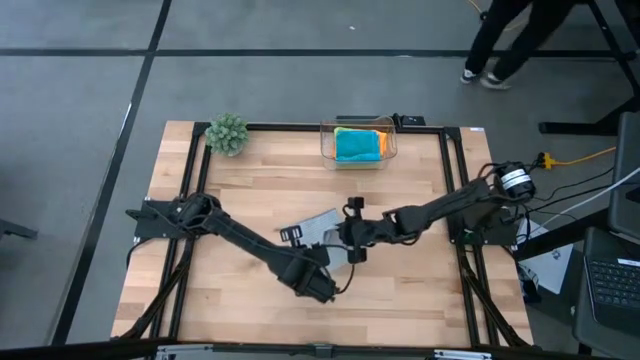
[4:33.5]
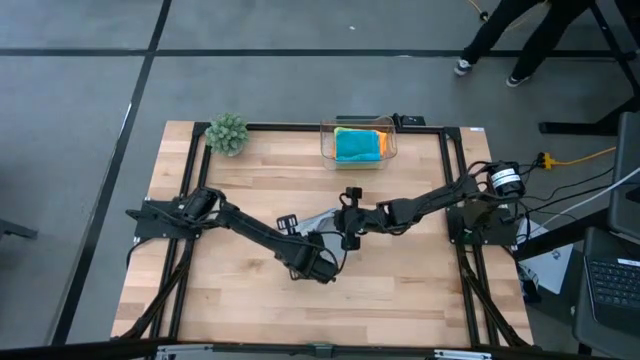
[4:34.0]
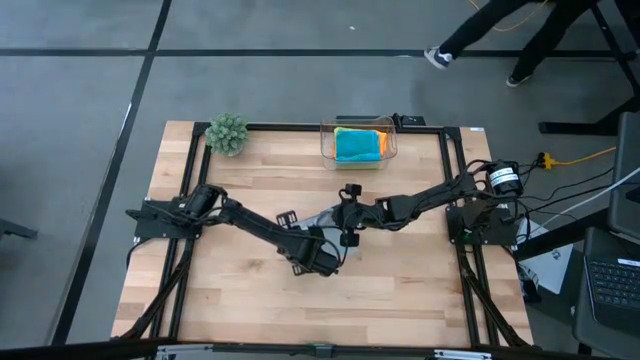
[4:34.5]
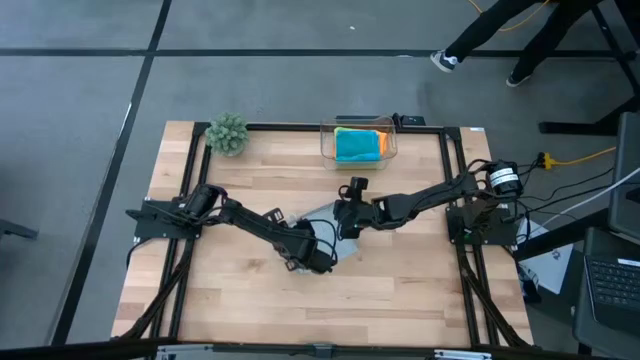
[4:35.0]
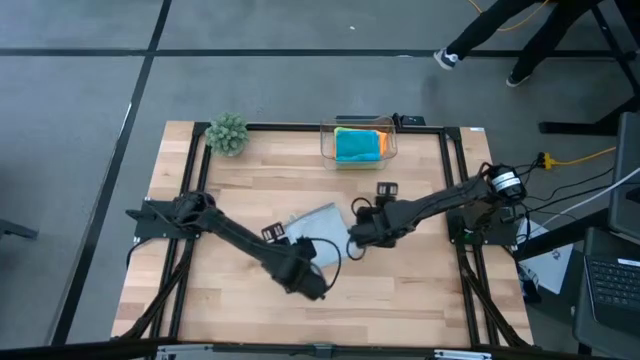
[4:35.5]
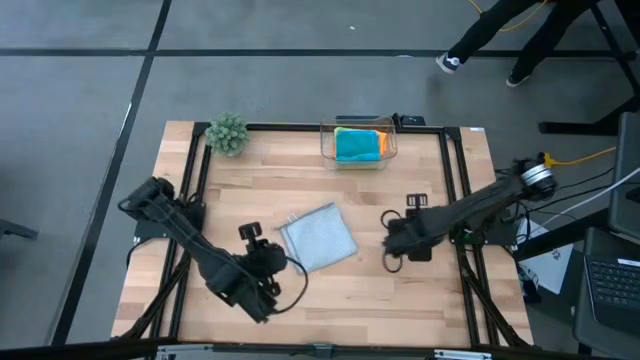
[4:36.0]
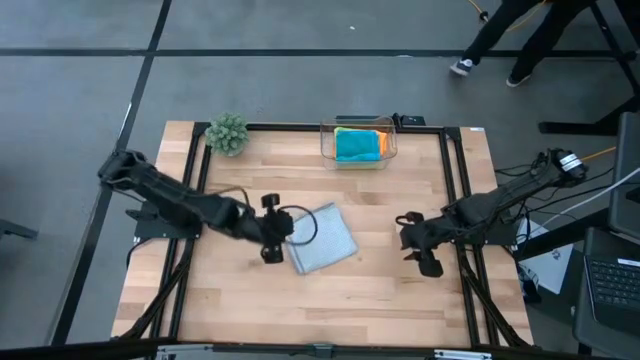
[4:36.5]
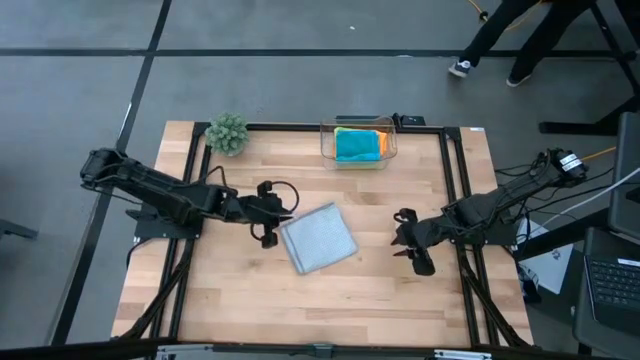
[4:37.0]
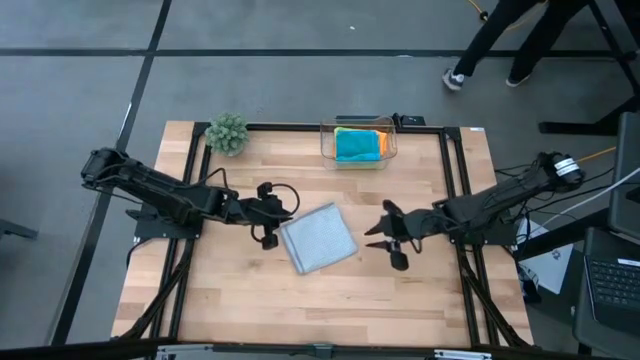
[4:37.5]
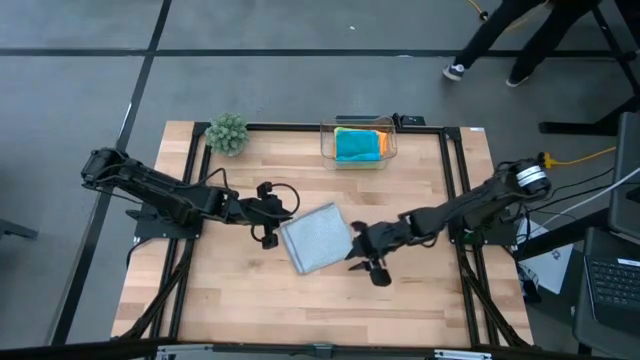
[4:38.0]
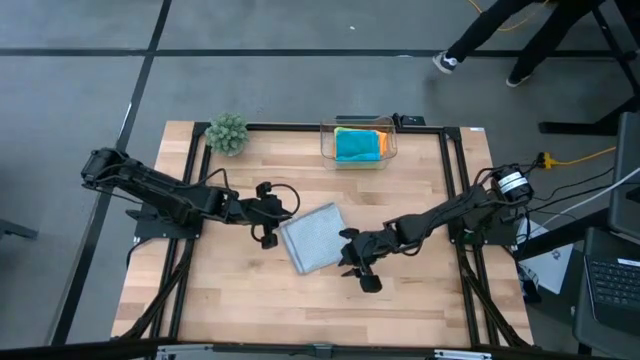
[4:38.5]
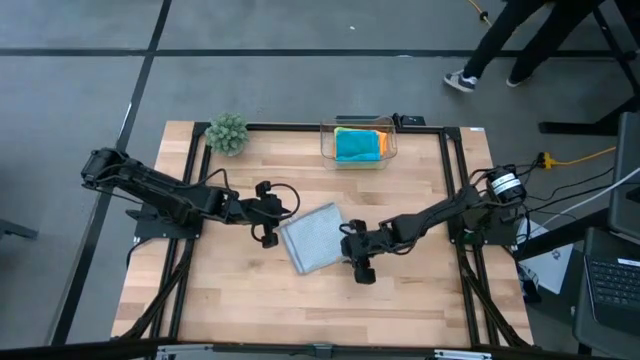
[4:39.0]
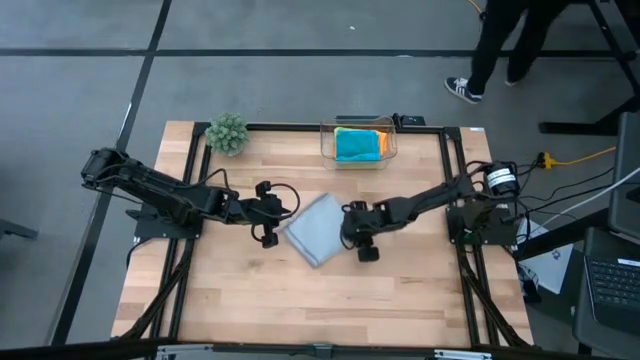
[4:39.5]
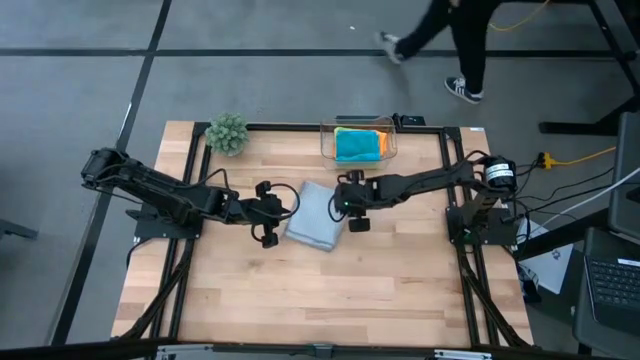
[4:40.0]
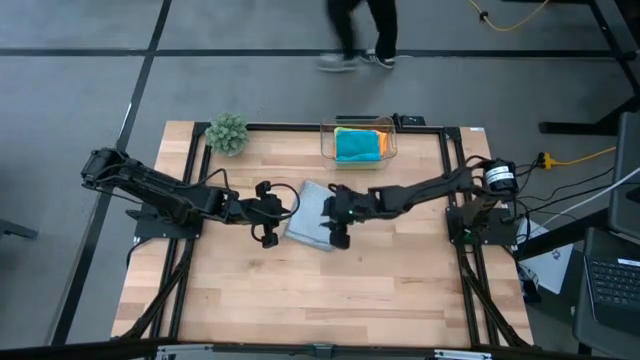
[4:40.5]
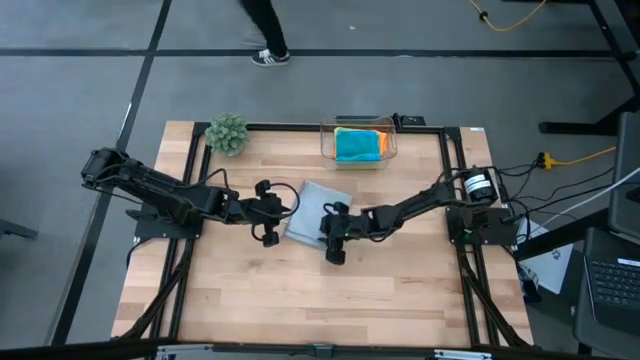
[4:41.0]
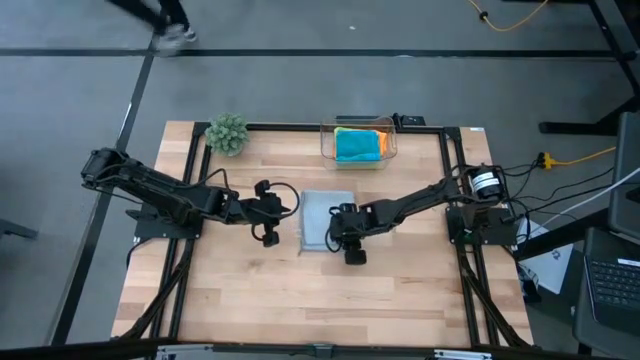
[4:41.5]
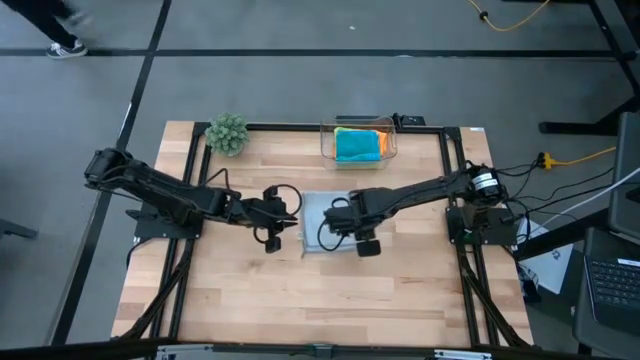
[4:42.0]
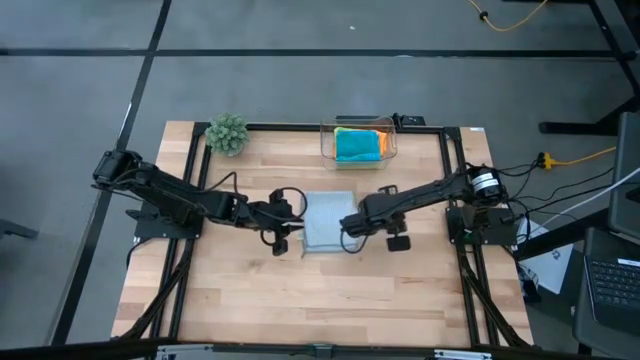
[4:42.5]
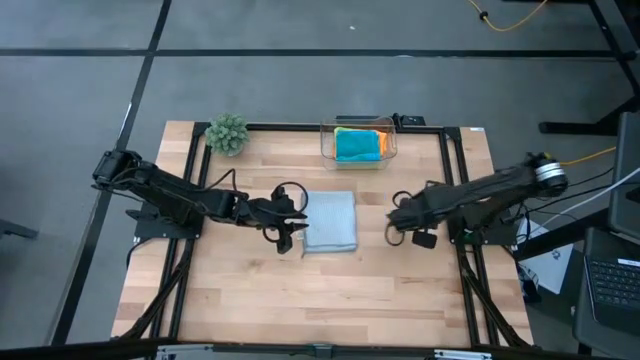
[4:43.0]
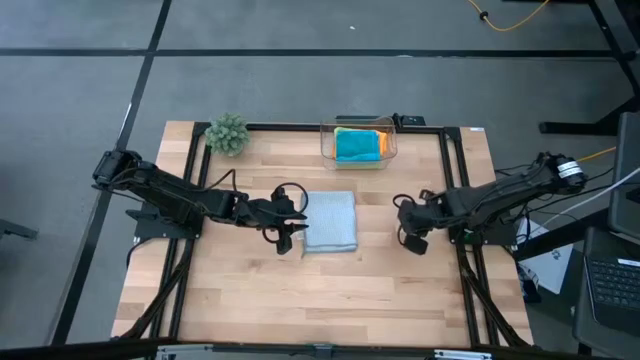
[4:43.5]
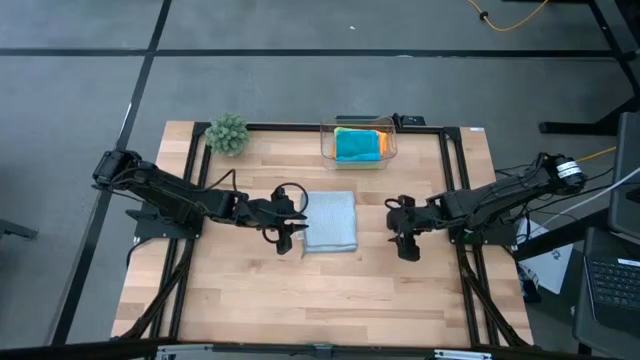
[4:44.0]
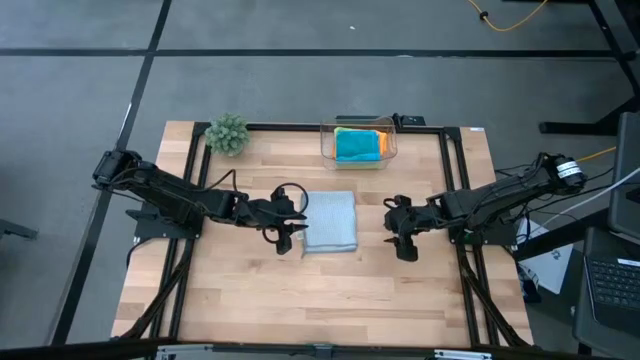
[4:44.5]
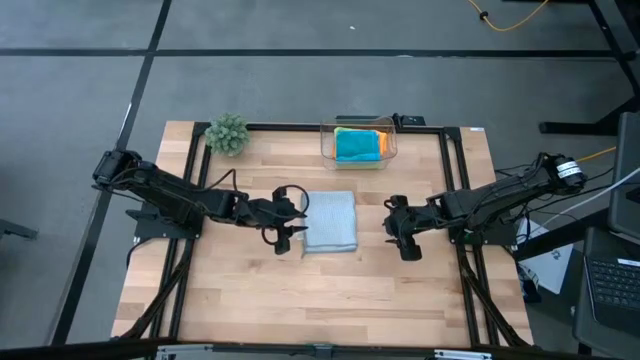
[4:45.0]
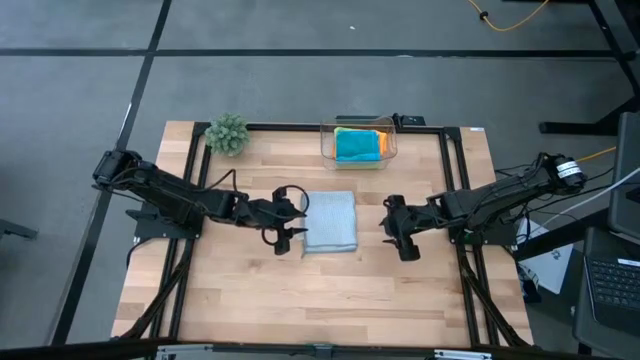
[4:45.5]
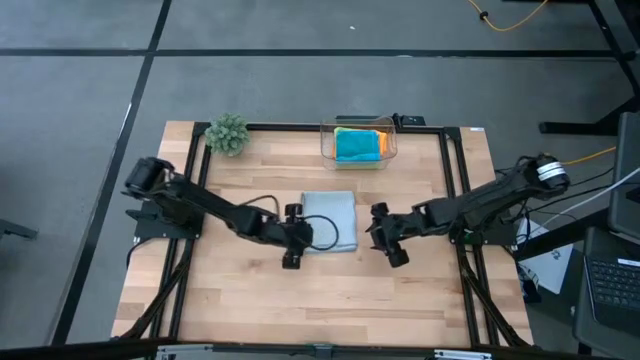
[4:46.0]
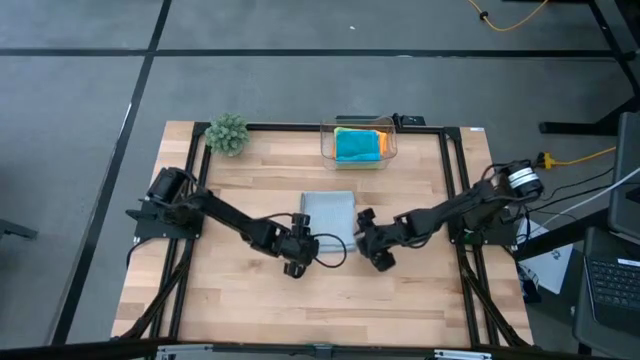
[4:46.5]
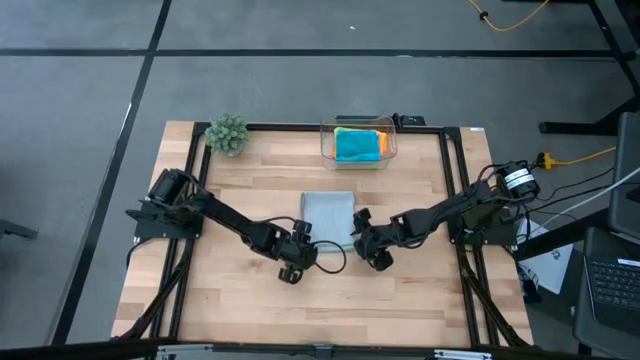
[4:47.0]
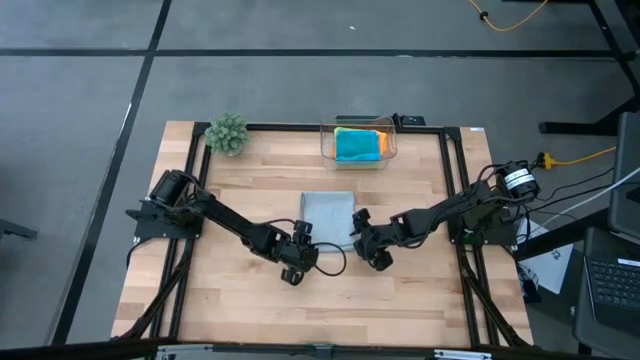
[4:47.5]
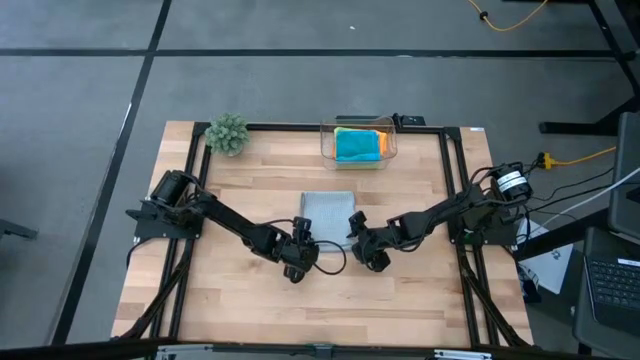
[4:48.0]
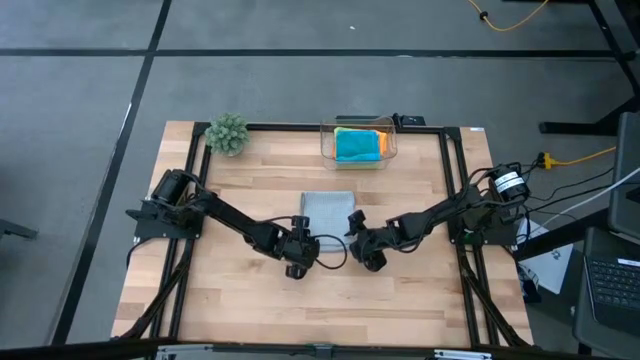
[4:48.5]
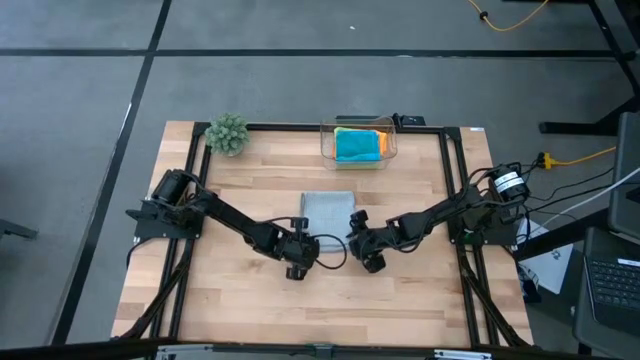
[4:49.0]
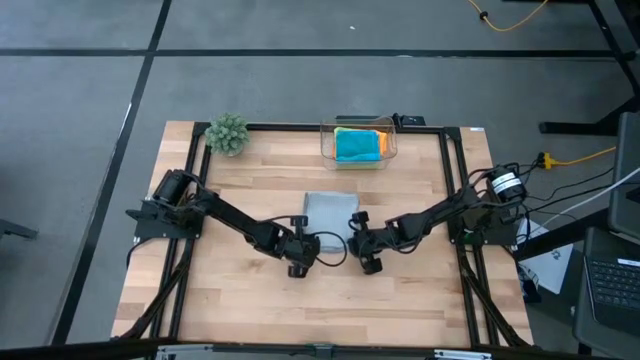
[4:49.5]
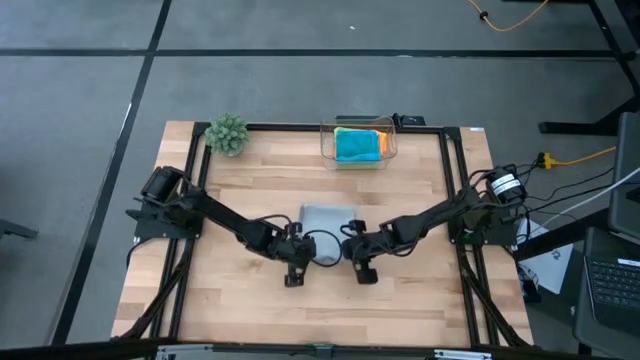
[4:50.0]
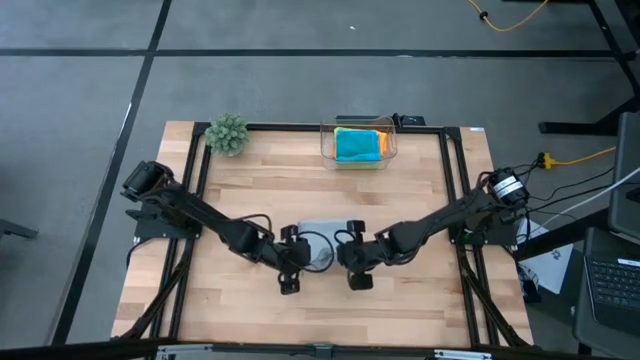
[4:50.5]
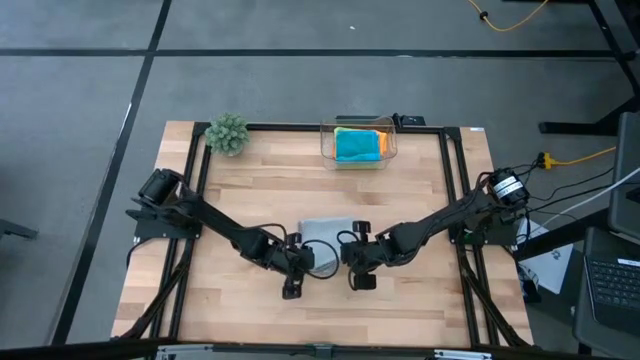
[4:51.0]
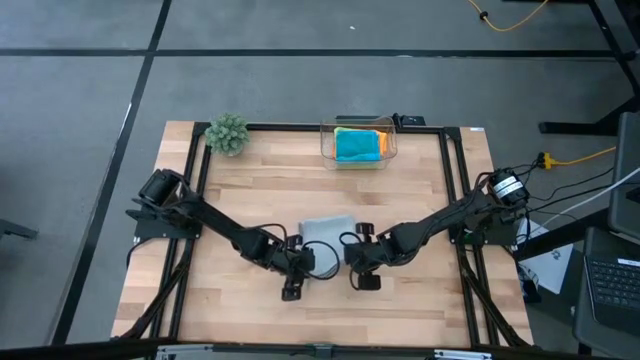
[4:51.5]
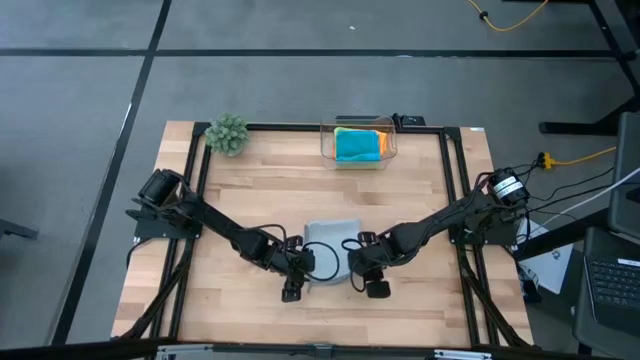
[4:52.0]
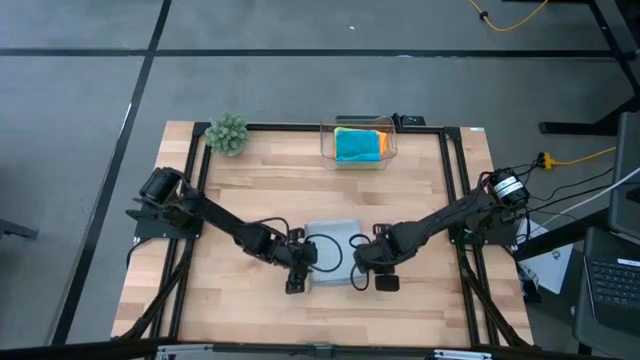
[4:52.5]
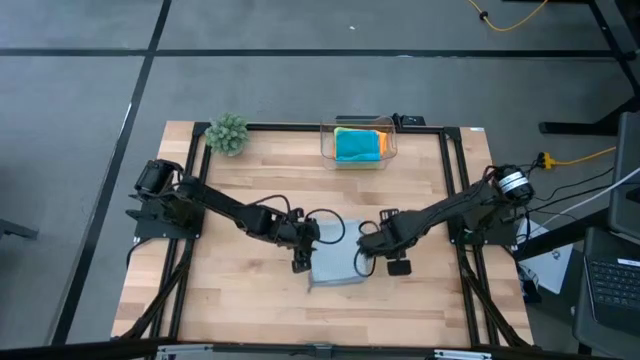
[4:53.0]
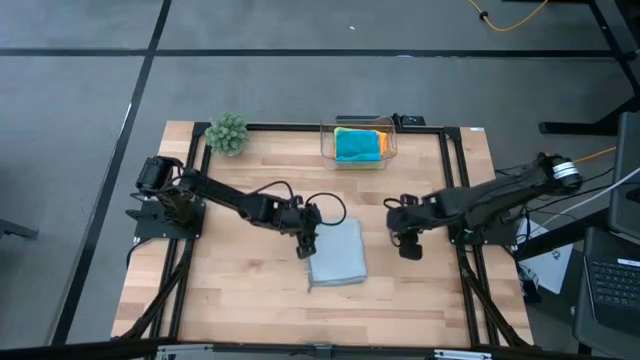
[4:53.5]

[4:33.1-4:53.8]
Task: Fold microfiber towels
Fold the gray microfiber cloth
